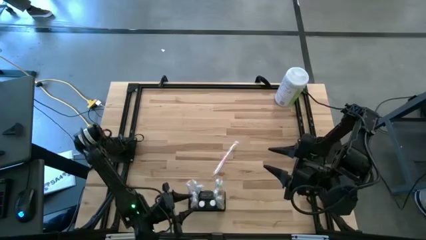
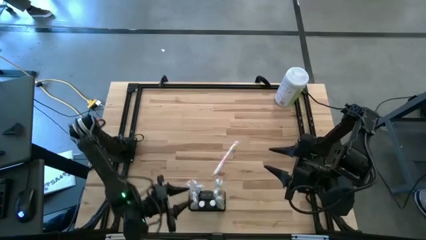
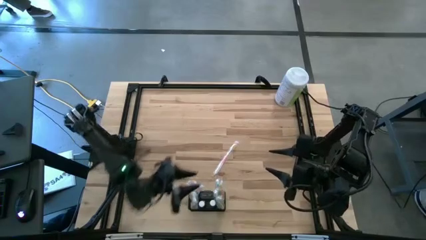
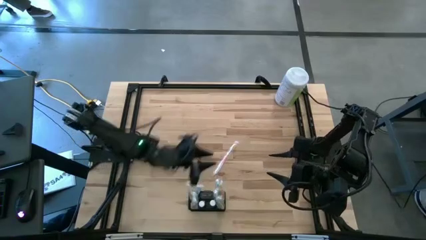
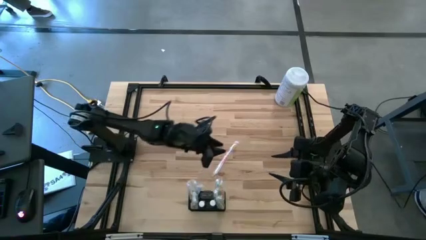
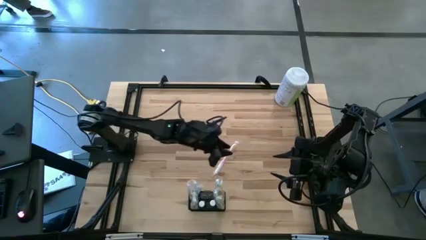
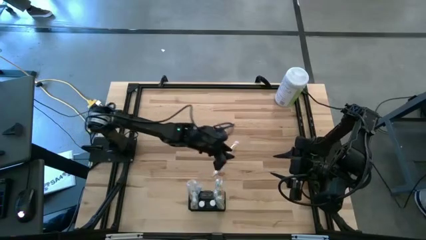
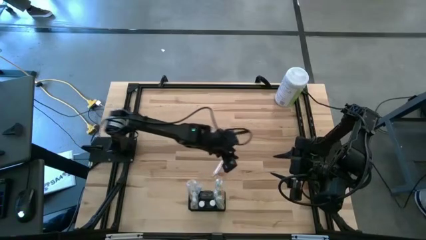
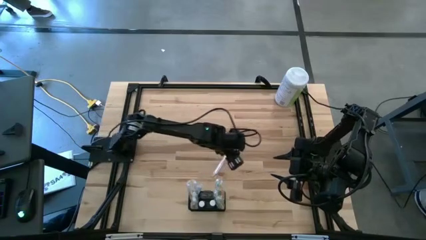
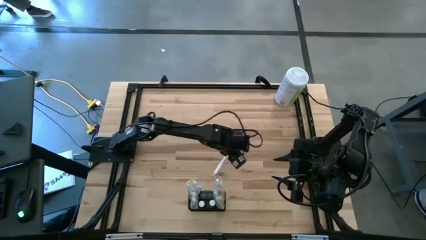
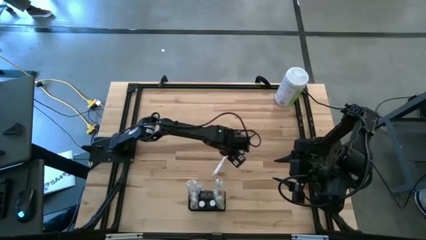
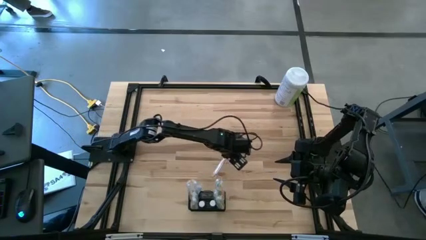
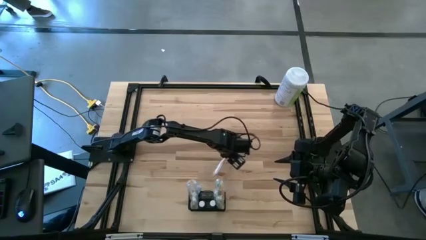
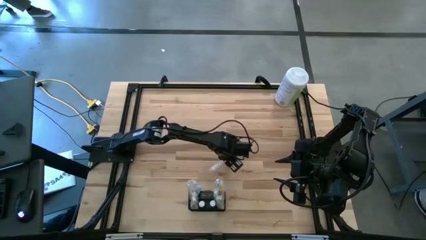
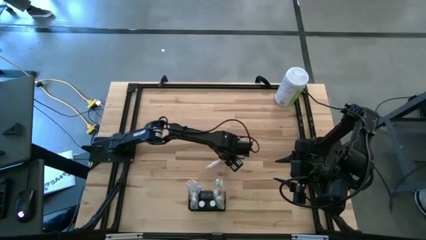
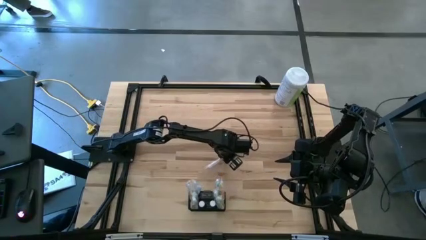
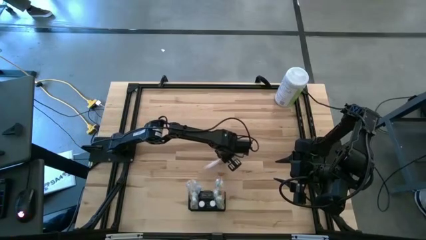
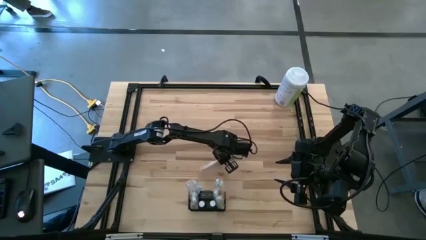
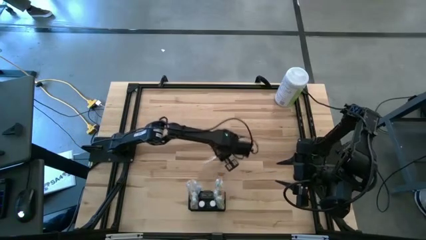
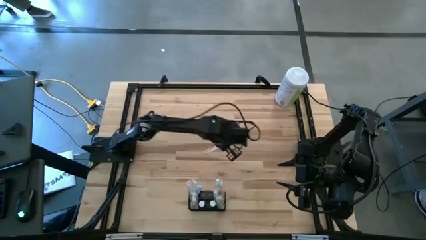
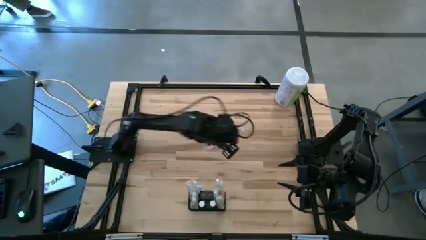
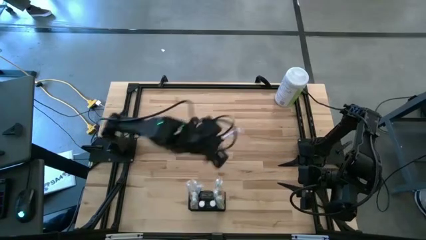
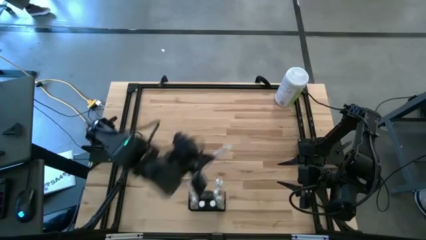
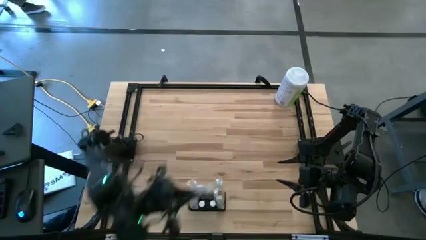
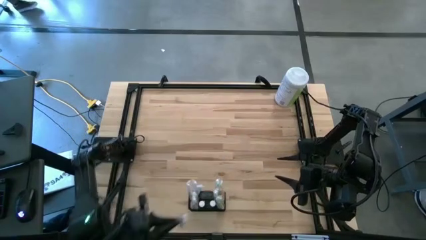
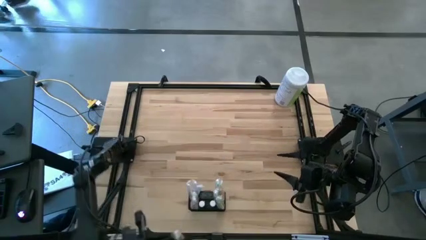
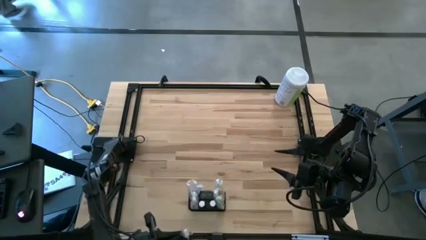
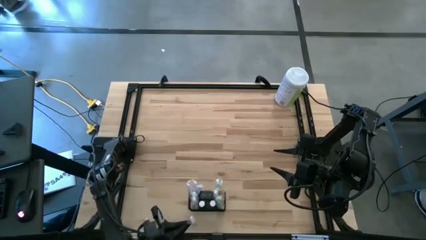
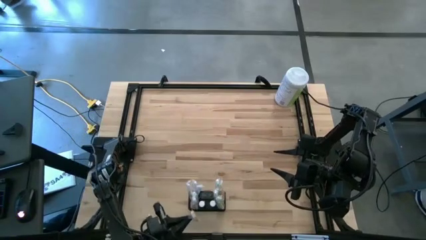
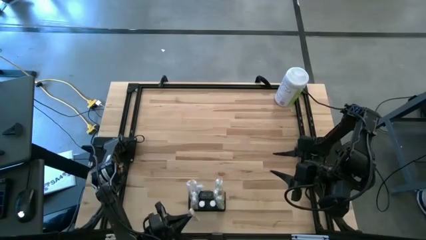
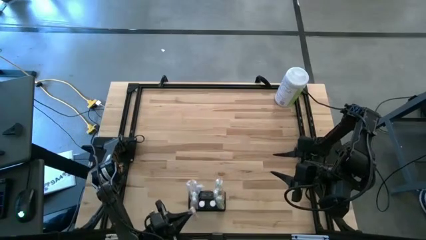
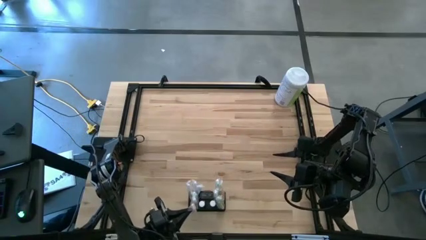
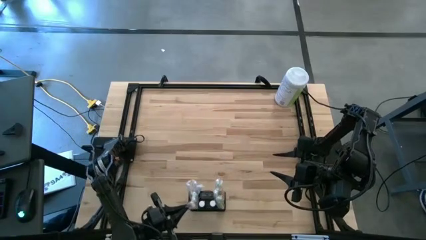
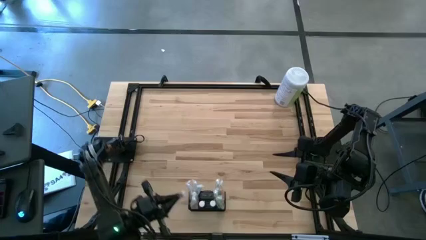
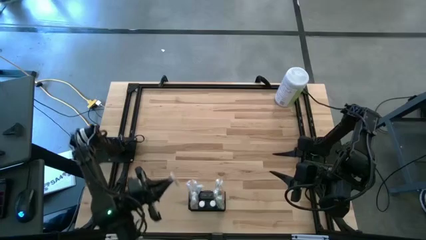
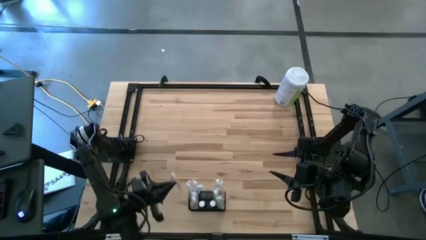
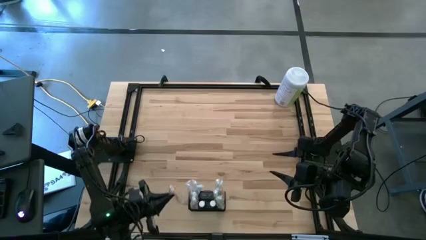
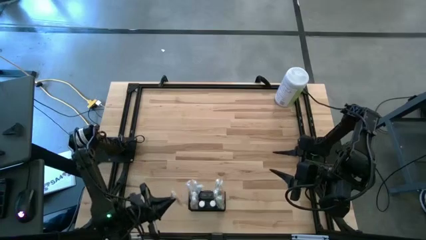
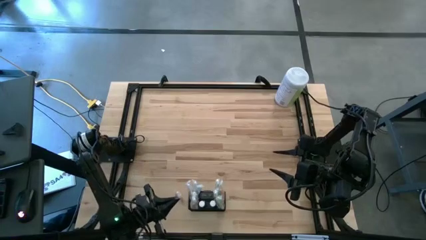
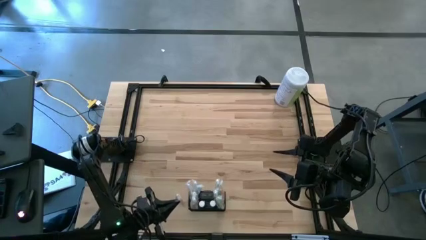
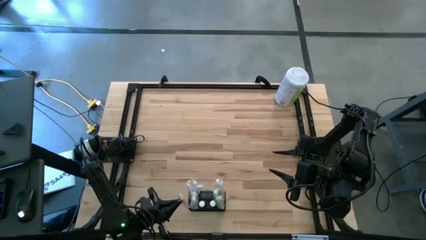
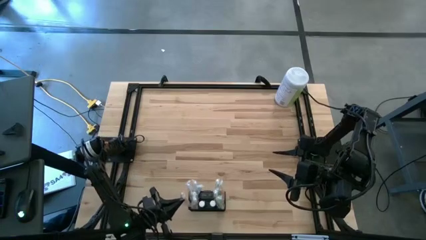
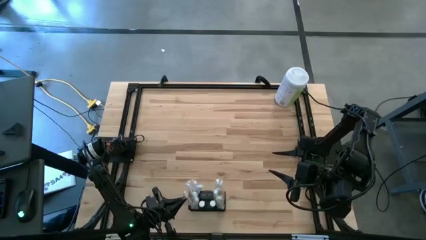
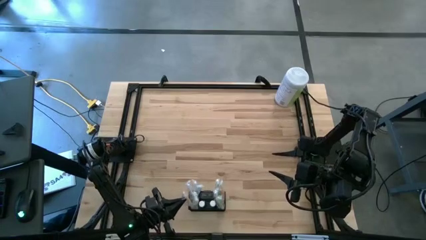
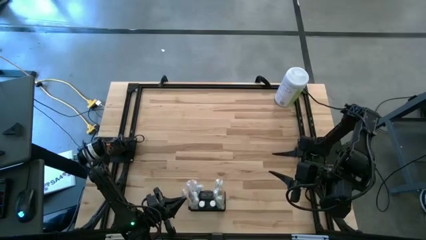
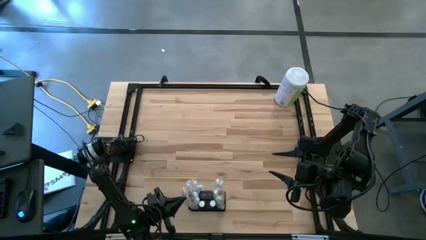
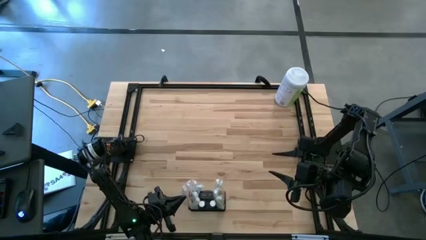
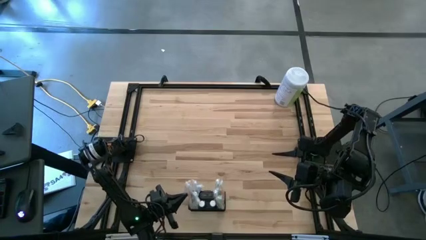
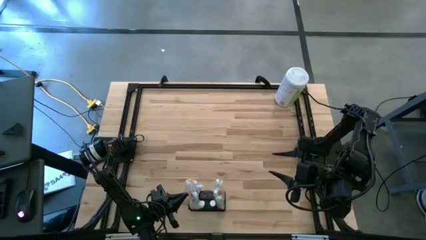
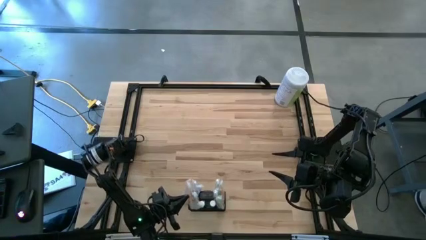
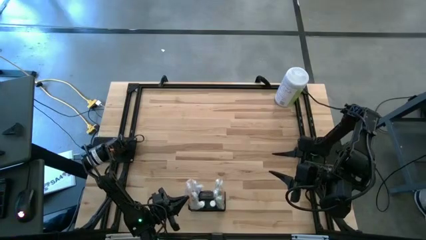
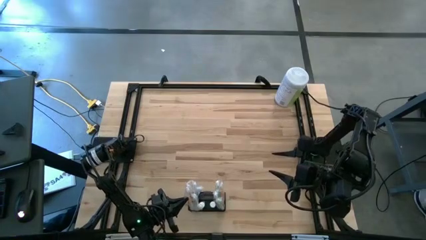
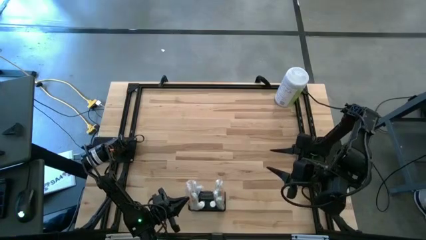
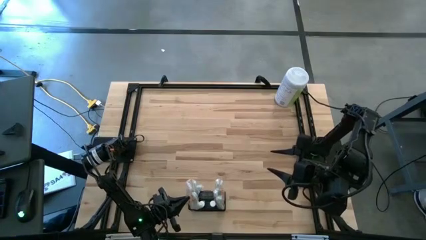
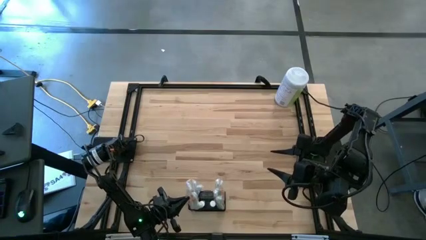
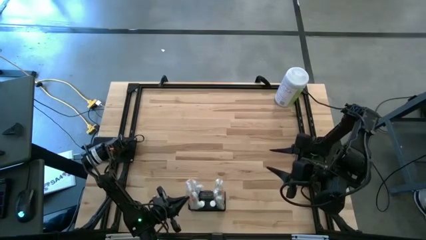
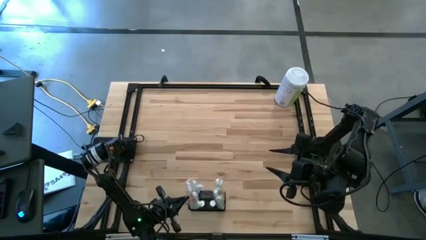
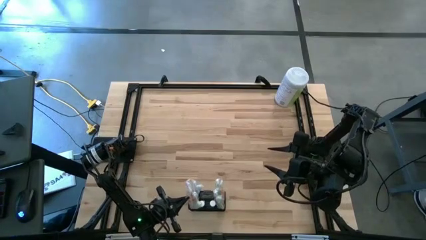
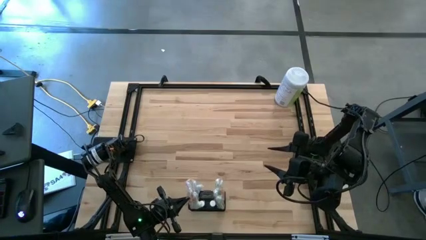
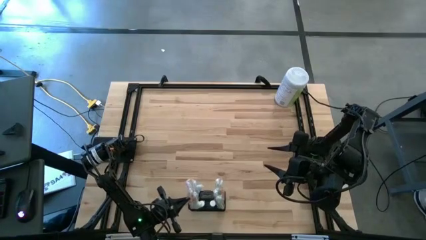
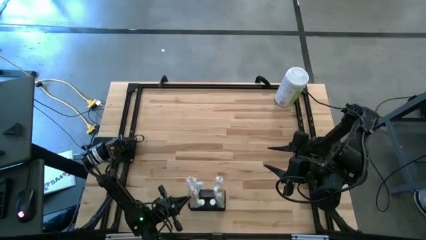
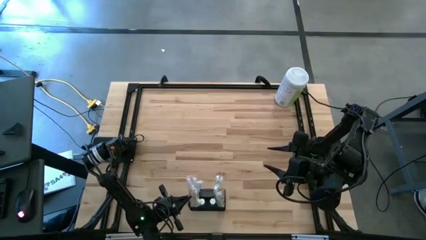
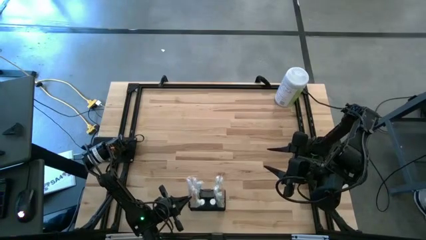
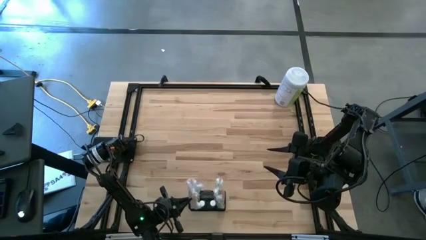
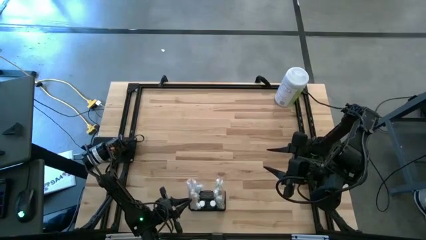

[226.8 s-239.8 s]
Task: Pick & Place toothbrushing station
Put the orange toothbrush into the black wire organizer

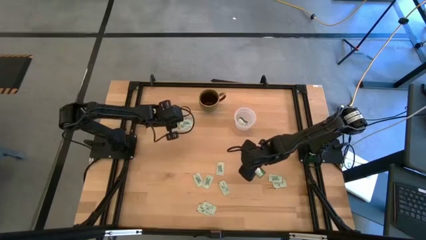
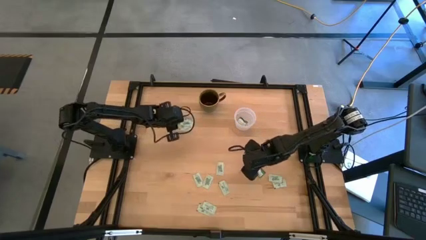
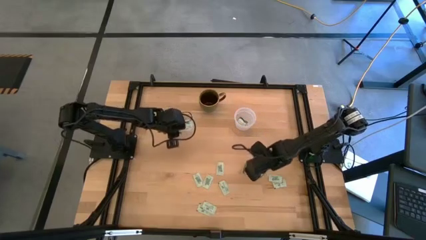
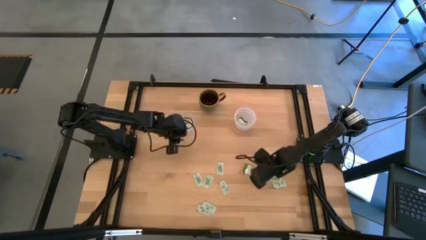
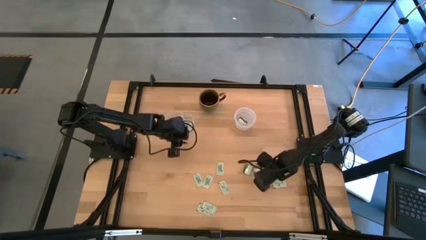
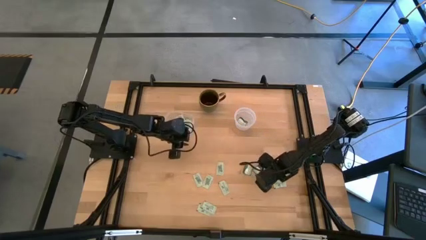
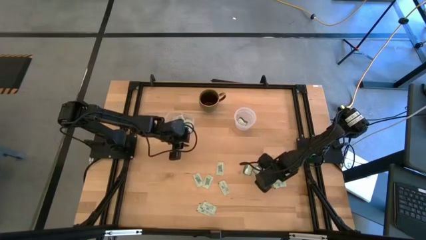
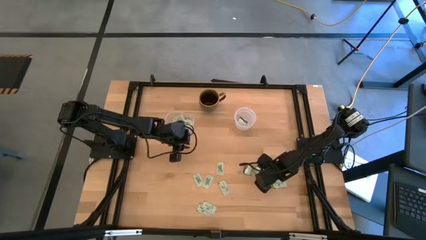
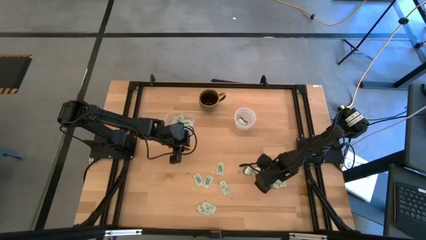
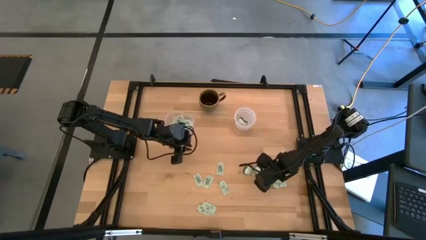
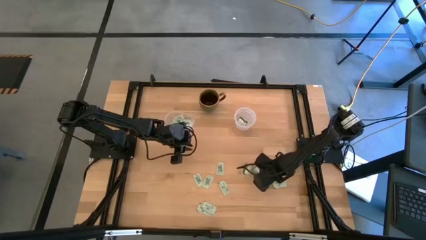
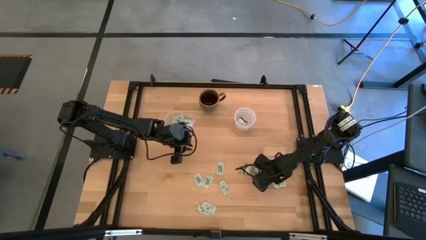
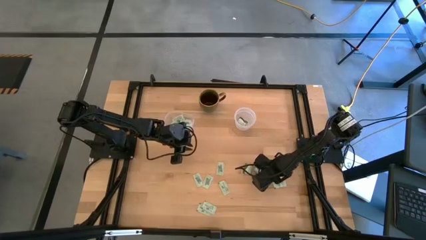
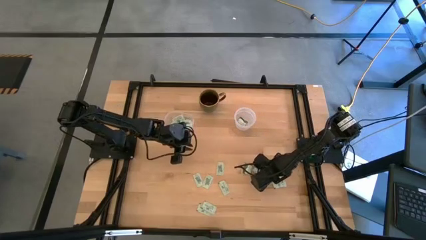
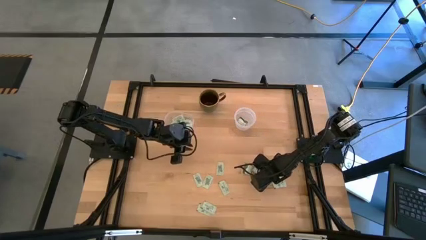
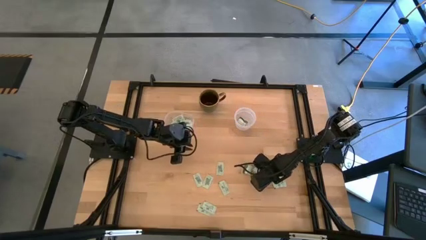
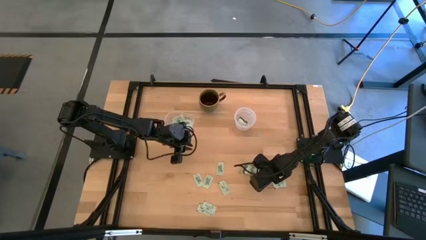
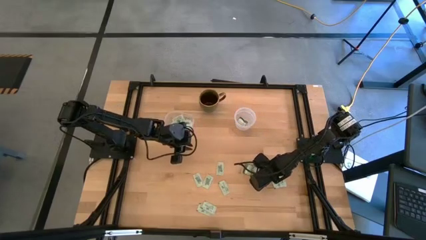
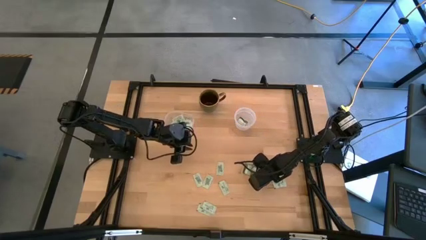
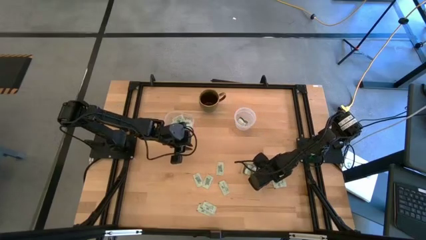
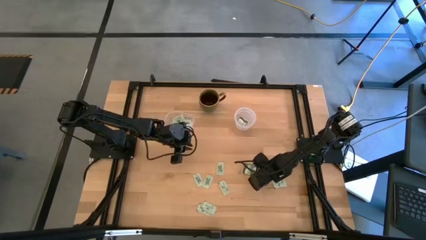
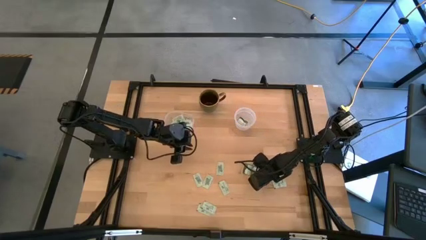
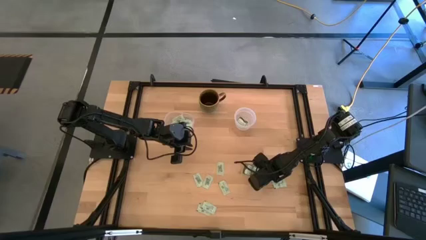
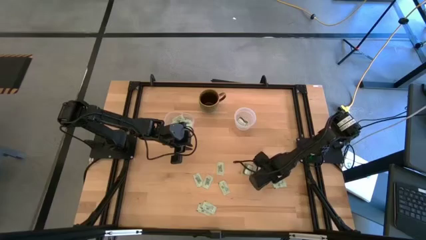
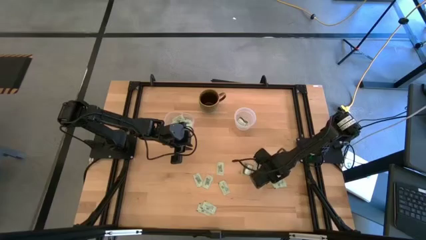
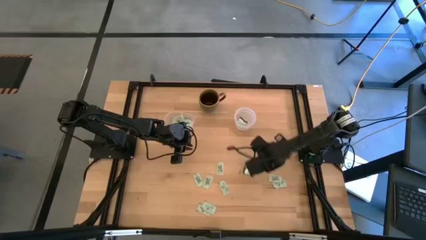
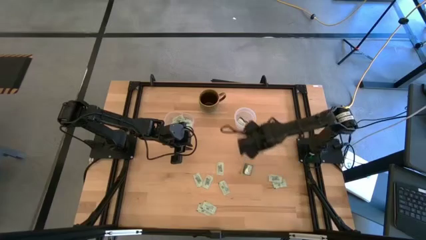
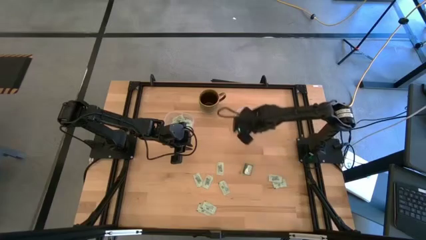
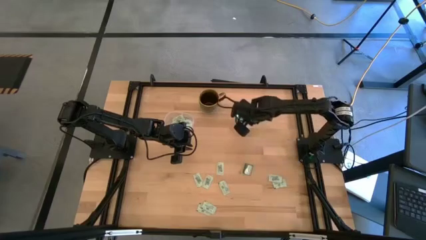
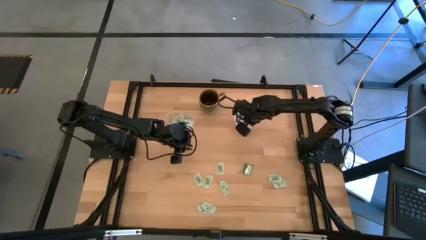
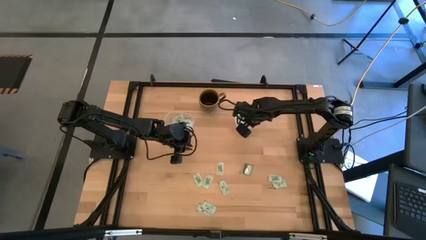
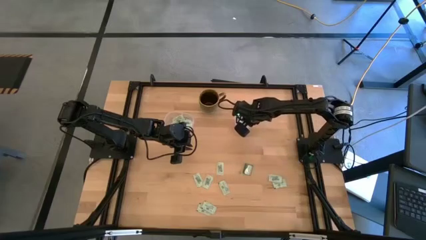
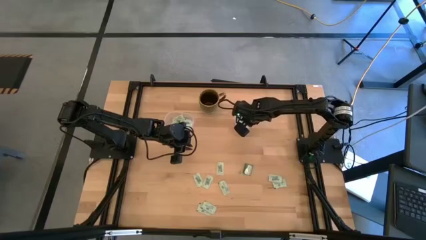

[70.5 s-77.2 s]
Task: Pick and place Stevia / Truvia into bins
Put the green stevia packet into the right transparent container
